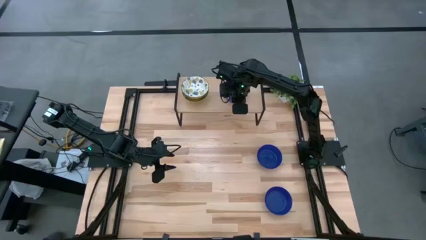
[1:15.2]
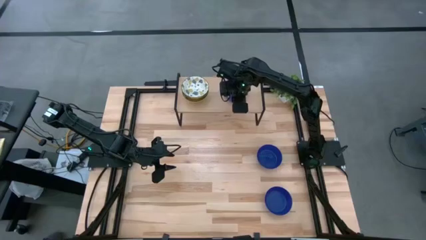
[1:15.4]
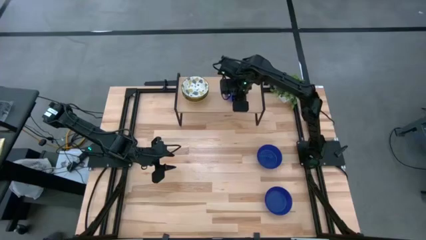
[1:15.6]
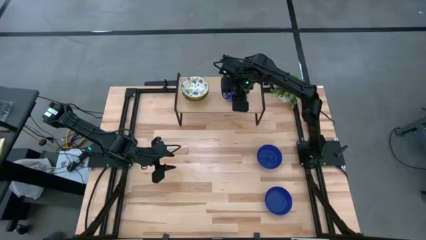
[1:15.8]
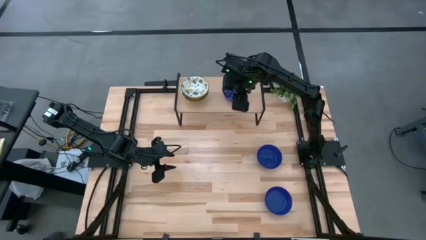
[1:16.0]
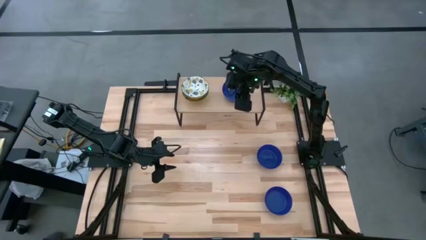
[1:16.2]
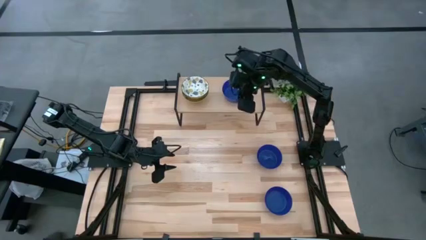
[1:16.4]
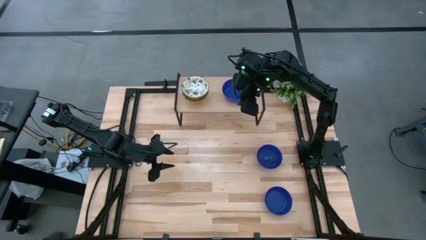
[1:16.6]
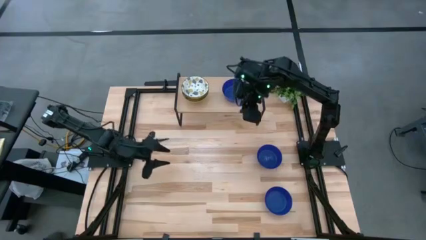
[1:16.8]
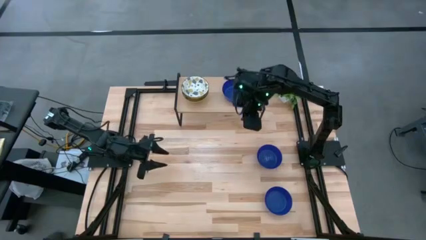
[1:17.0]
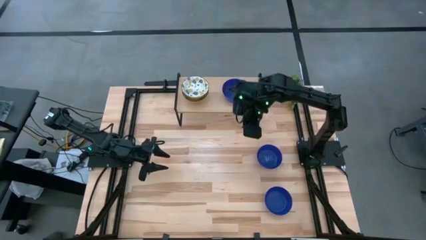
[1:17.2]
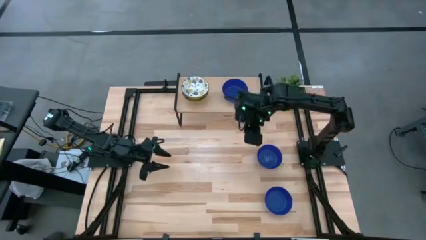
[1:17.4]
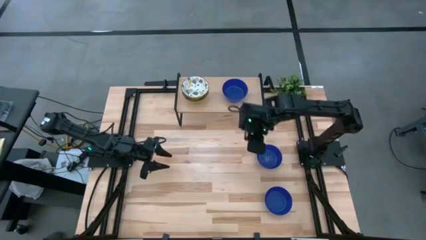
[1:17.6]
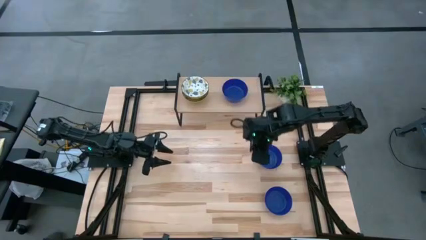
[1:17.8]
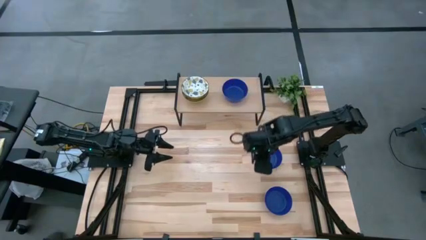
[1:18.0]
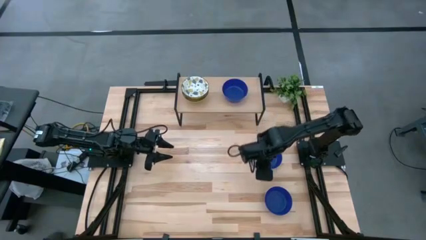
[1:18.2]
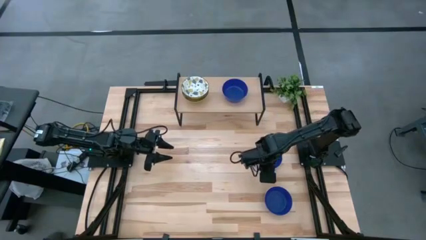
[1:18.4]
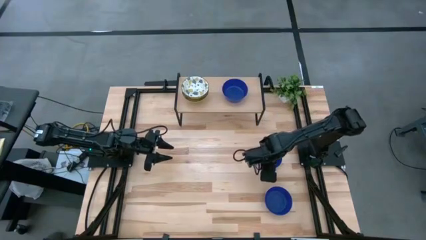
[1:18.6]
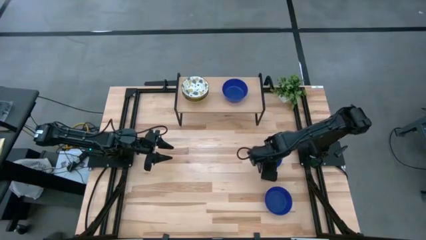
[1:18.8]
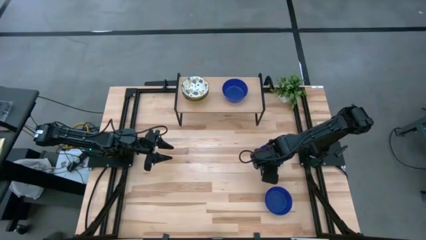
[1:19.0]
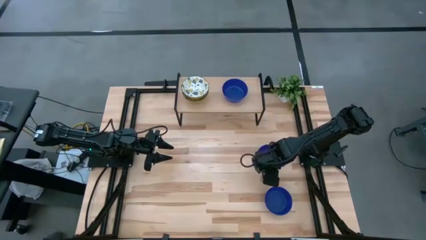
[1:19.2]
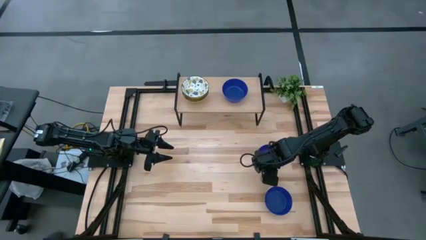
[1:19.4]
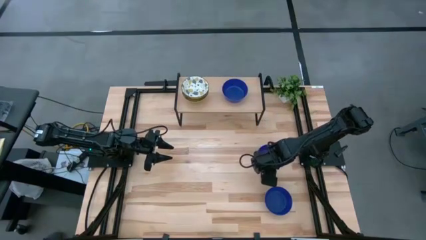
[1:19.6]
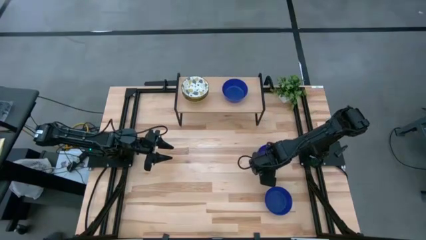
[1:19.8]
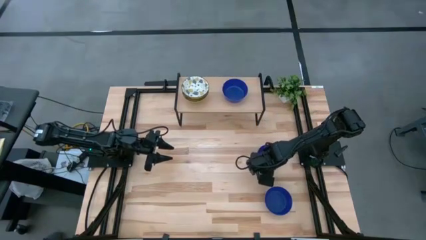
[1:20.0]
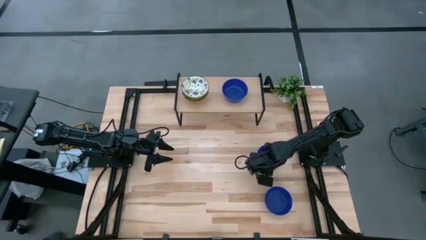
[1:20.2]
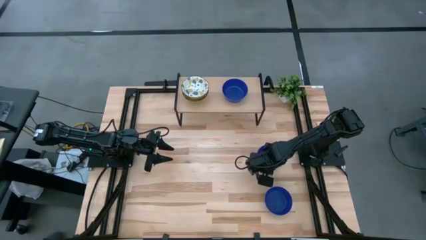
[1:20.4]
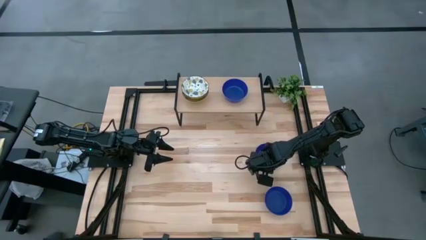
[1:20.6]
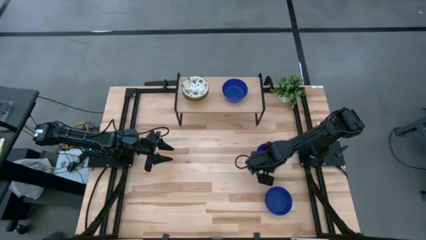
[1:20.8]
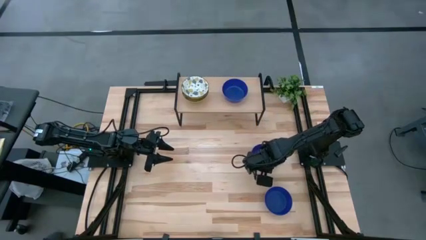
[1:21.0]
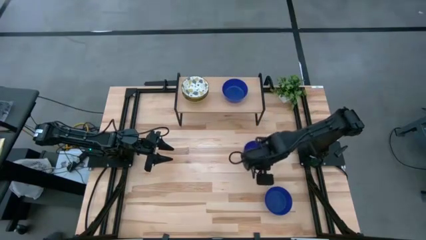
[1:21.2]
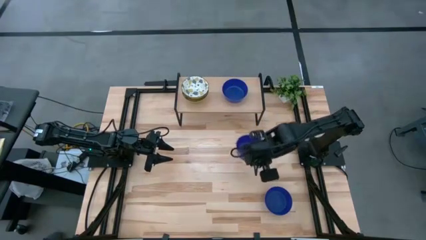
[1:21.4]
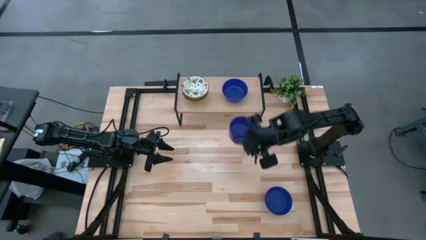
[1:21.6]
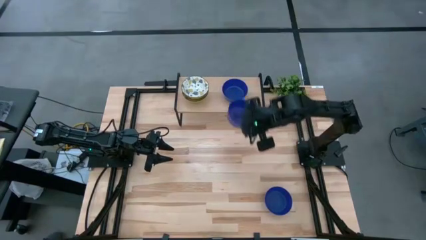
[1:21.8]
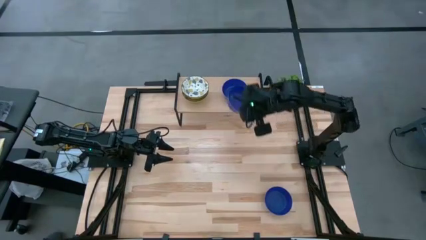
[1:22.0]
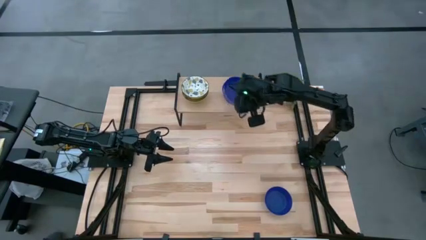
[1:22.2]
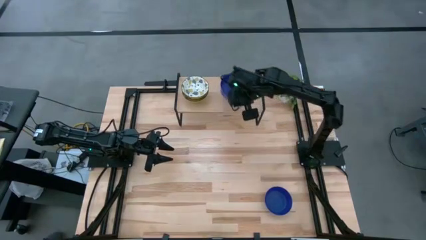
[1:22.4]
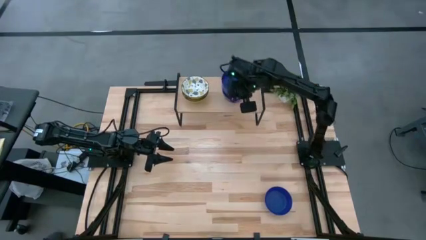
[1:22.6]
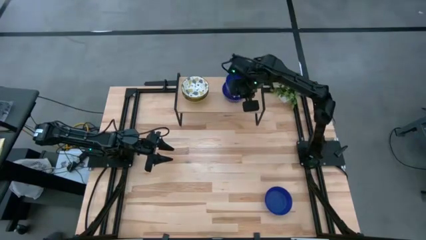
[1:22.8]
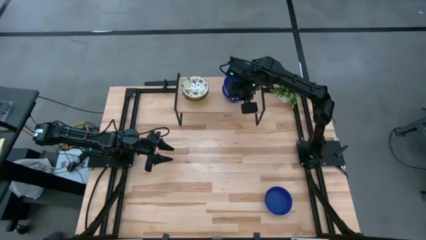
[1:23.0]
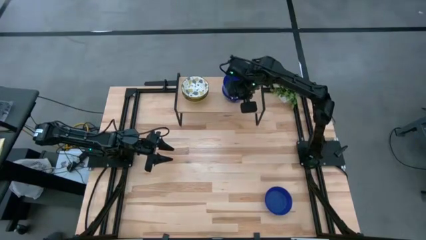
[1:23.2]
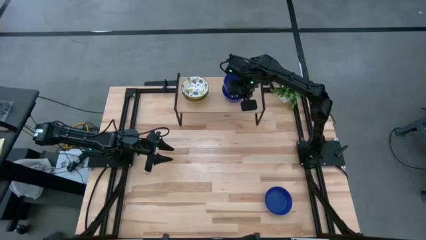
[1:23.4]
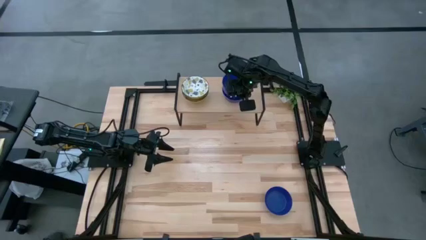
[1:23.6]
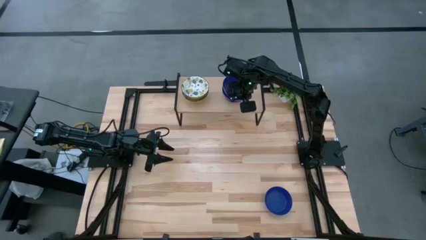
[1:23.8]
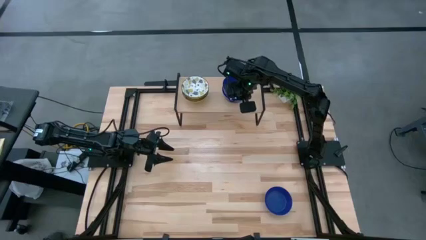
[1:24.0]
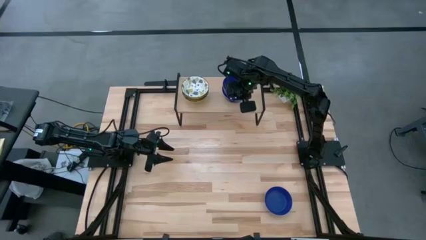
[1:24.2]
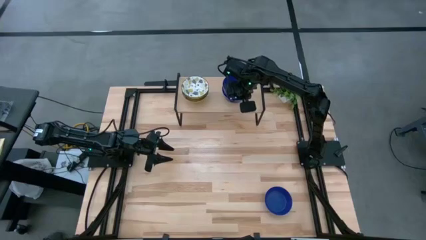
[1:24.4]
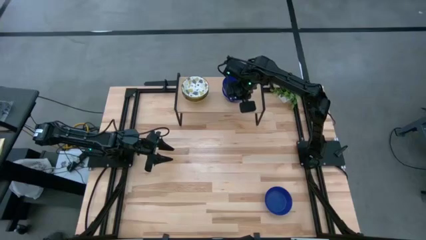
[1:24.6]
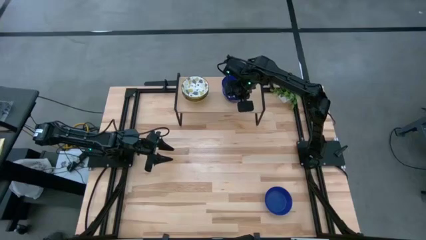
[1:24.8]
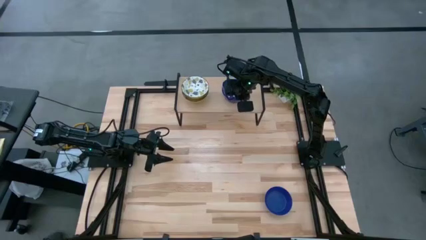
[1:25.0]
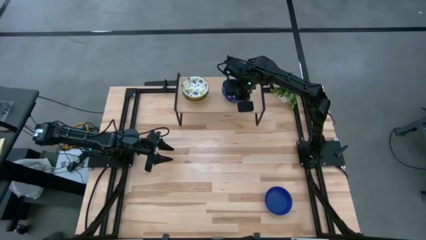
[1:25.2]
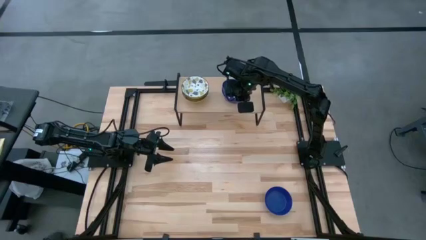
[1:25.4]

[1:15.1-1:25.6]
Task: Pick & Place Mini bowls
Stack the top blue bowl on the blue bowl on the shelf
